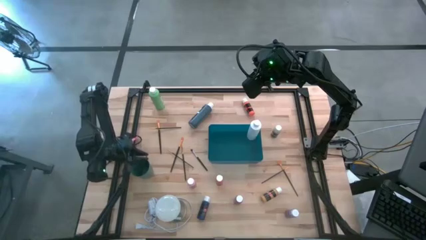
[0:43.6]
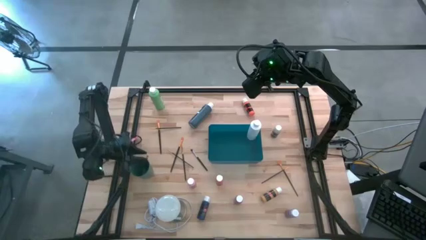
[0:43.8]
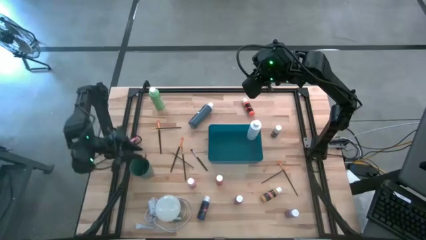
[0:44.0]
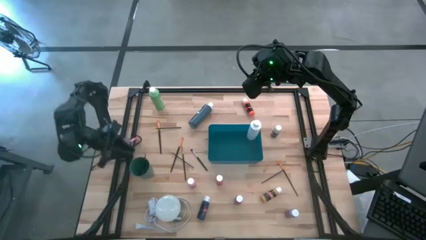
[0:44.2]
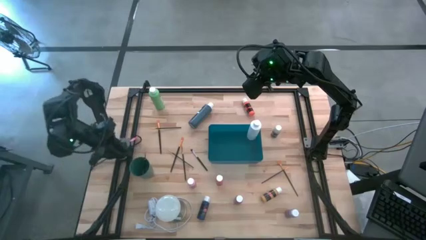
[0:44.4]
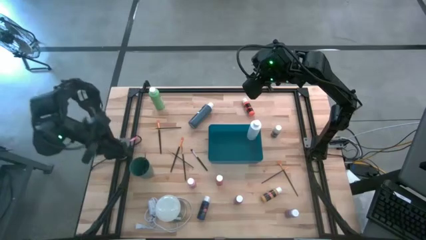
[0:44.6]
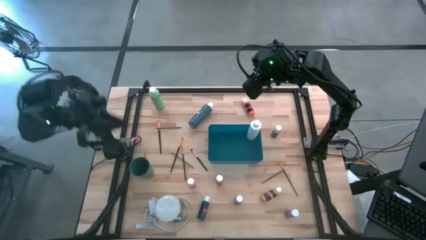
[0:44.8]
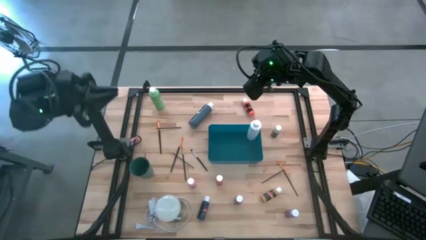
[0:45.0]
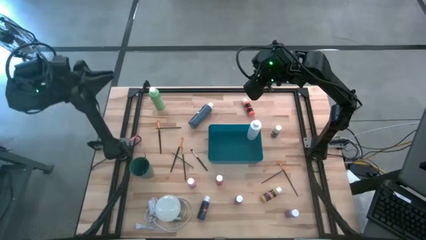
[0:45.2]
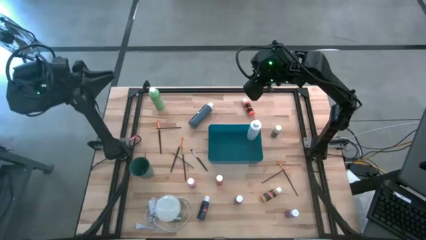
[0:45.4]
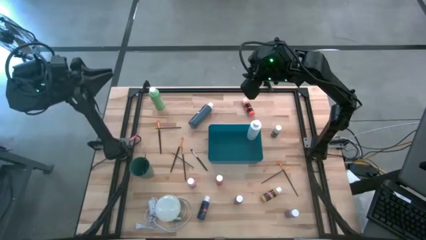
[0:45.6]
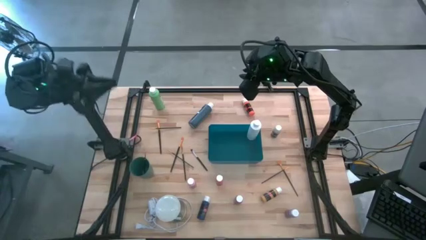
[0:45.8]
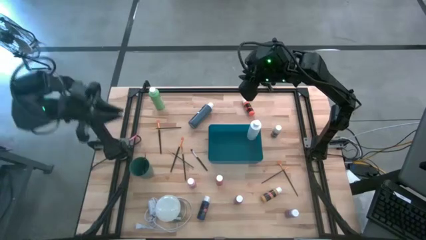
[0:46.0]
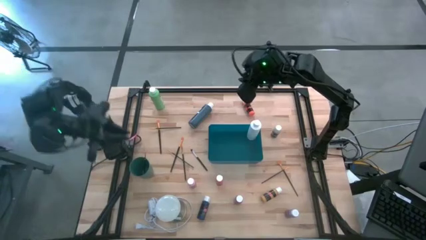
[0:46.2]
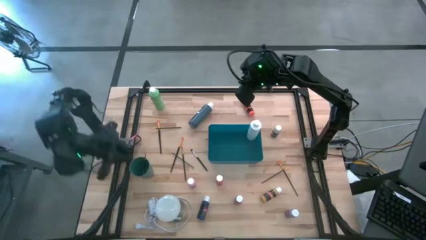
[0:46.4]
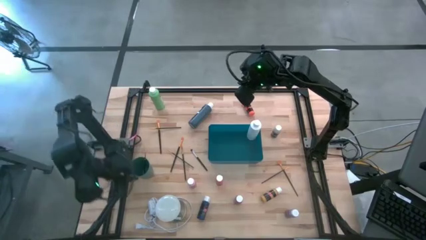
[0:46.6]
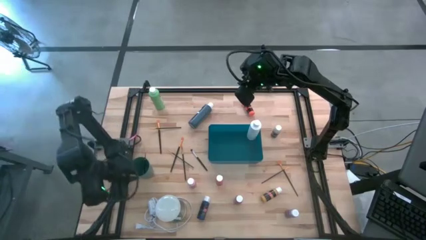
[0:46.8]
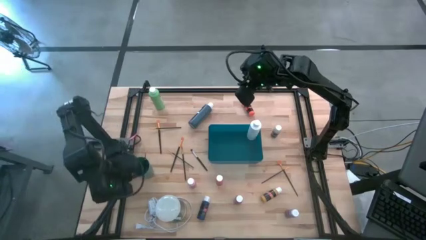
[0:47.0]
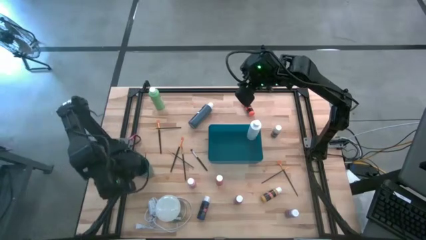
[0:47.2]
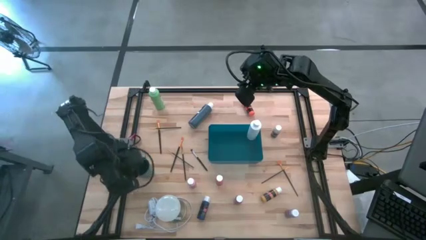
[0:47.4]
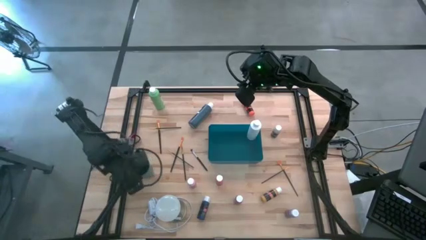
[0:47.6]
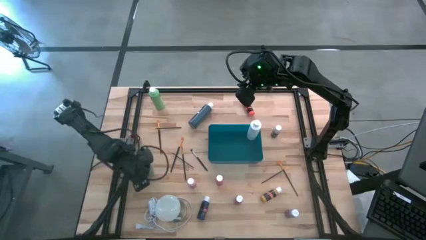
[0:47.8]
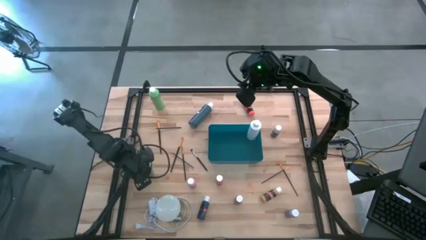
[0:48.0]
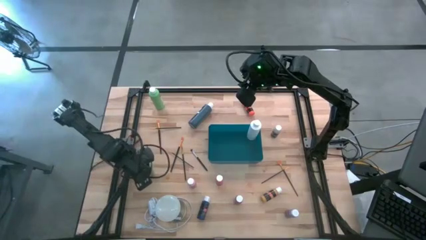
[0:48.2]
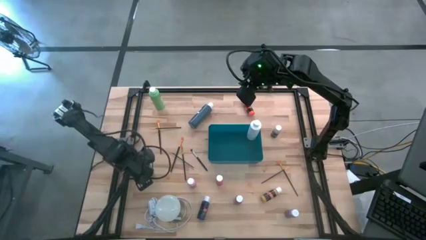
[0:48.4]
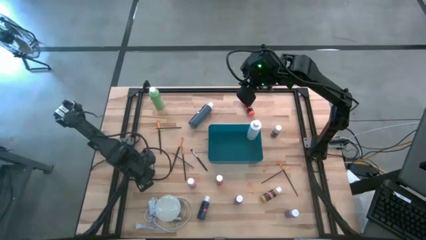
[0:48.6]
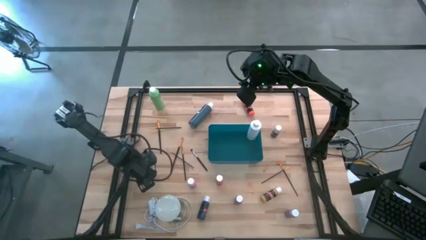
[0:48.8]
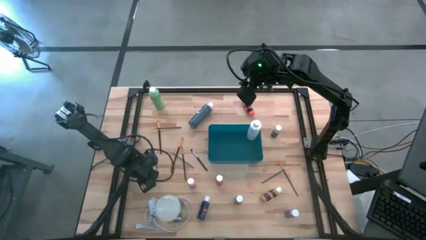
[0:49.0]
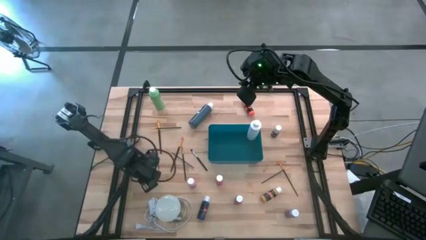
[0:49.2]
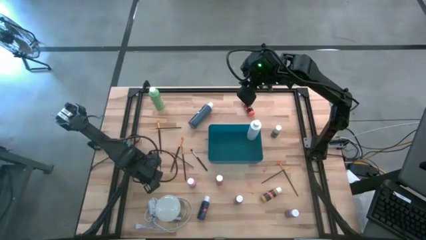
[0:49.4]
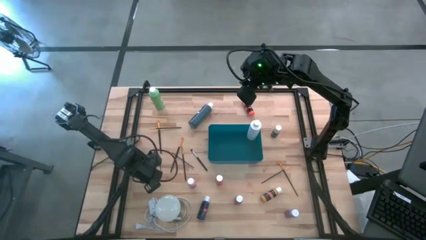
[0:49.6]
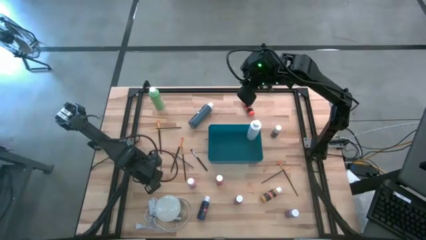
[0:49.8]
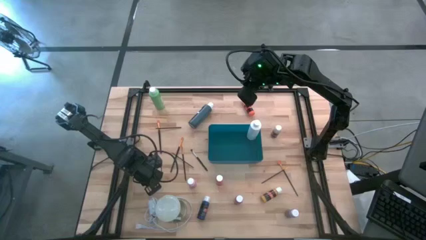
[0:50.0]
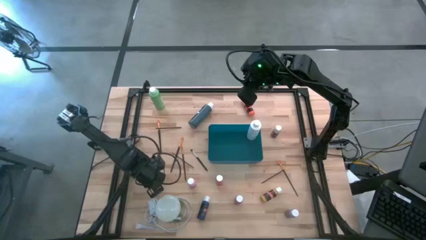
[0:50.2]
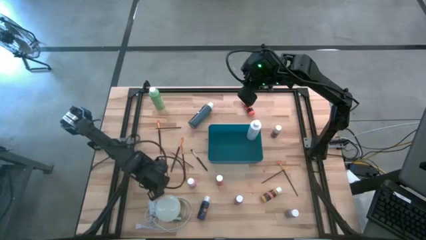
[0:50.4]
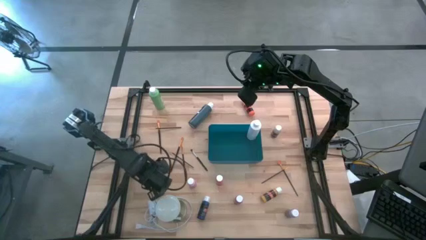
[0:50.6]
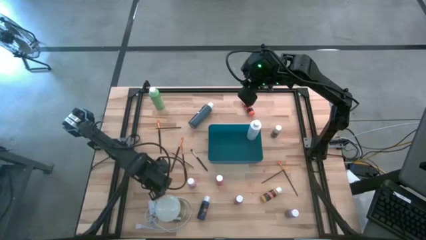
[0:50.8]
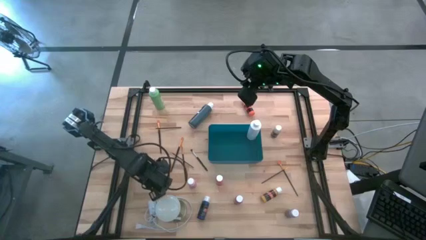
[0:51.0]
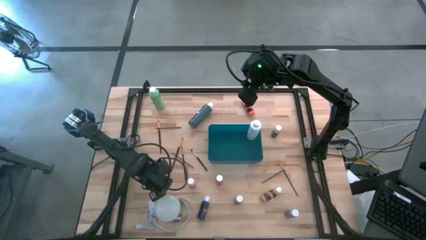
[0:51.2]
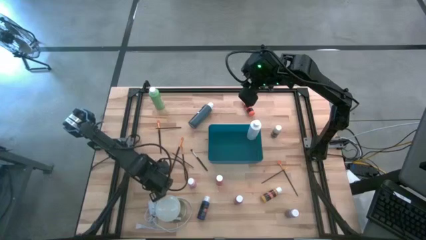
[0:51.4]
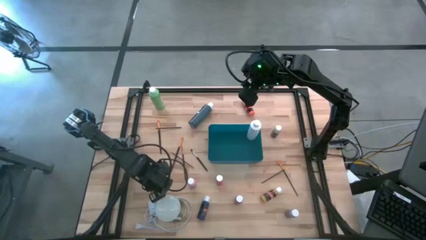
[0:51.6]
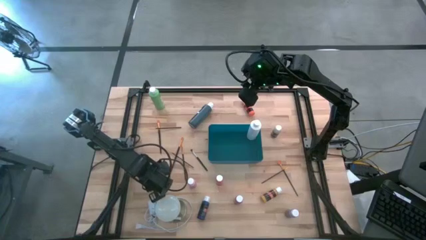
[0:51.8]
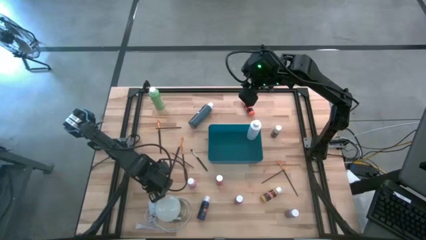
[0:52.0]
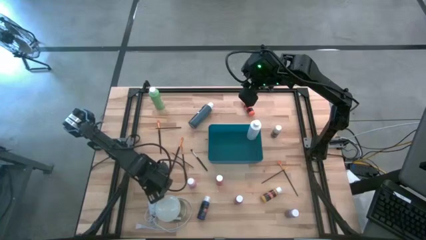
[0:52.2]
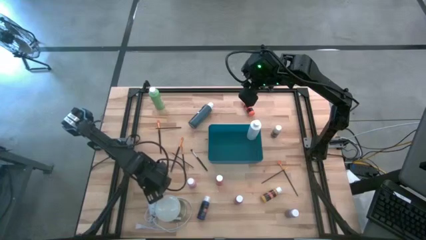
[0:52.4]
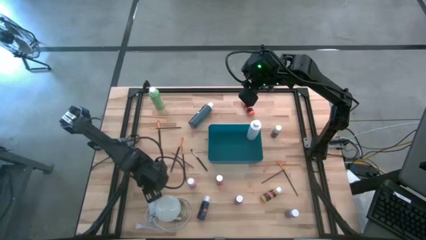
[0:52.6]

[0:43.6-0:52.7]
Task: Pick & Place Paint Supplies
Adjust the green cup on the table

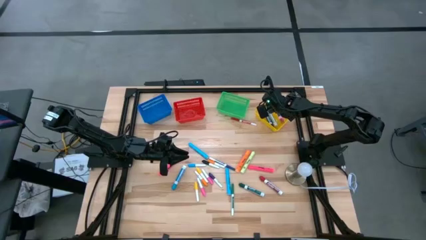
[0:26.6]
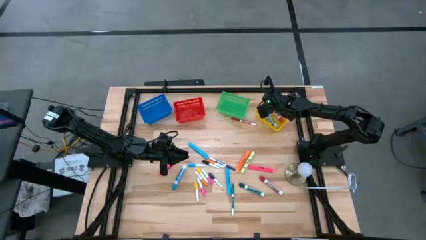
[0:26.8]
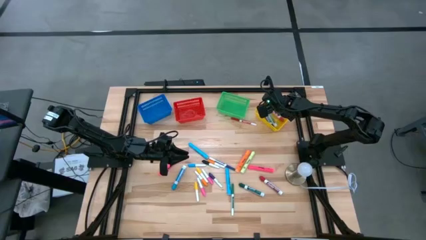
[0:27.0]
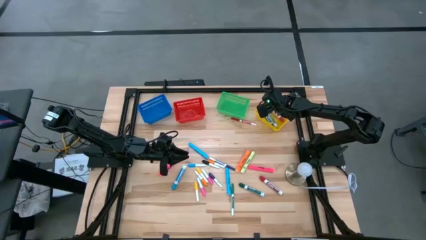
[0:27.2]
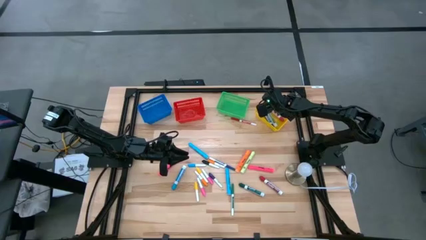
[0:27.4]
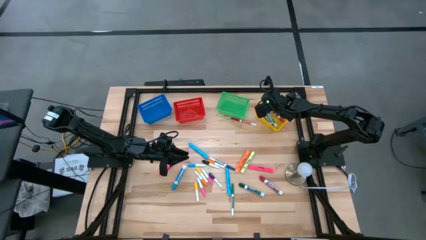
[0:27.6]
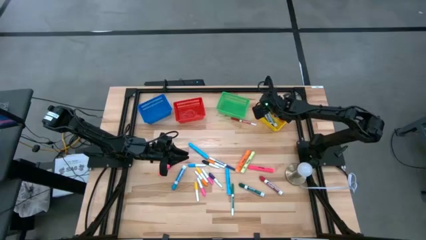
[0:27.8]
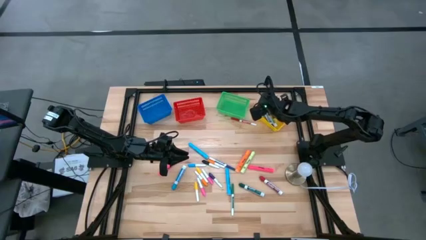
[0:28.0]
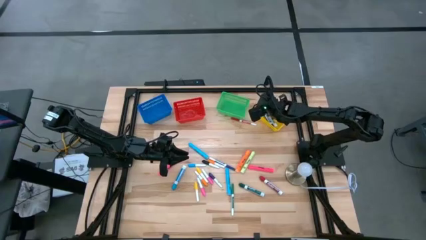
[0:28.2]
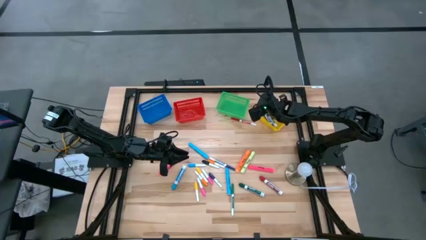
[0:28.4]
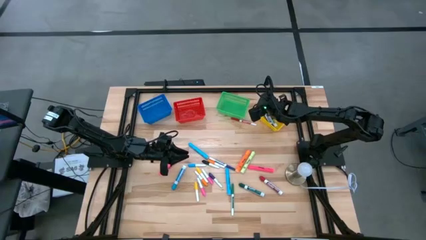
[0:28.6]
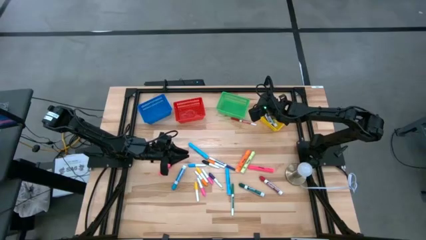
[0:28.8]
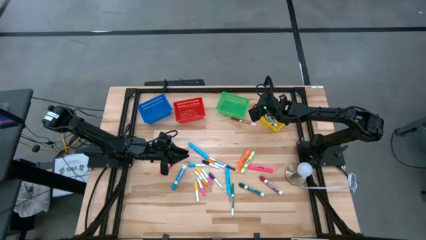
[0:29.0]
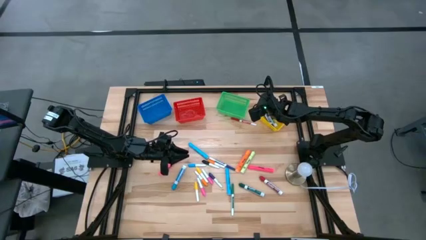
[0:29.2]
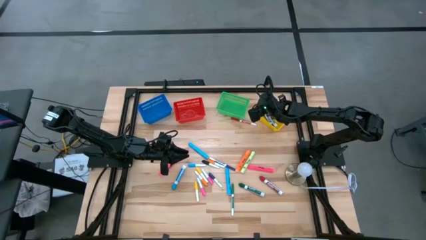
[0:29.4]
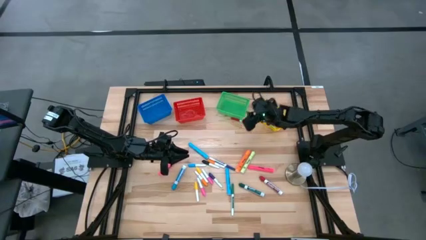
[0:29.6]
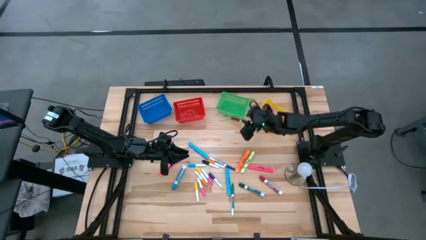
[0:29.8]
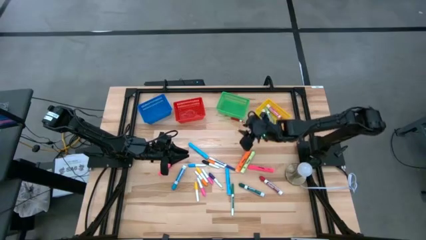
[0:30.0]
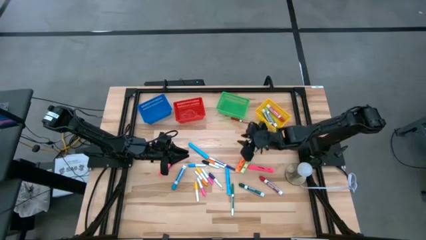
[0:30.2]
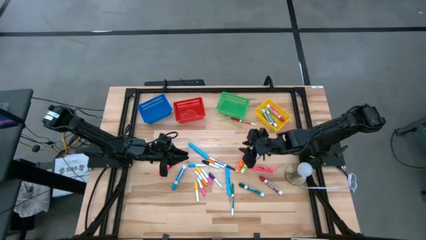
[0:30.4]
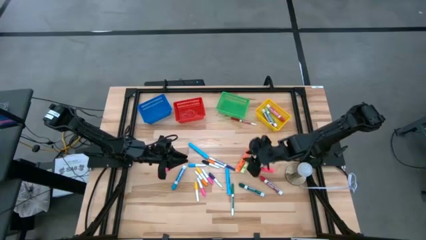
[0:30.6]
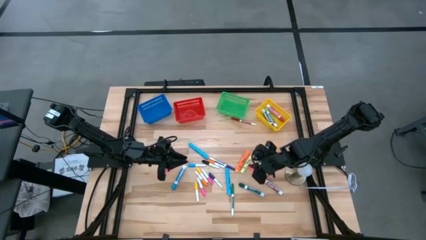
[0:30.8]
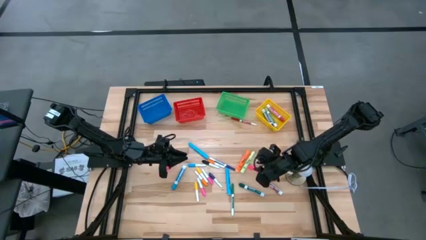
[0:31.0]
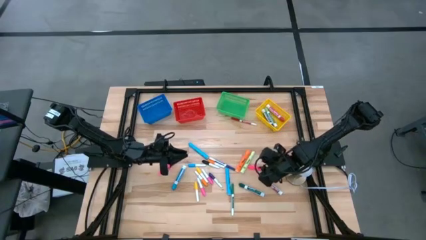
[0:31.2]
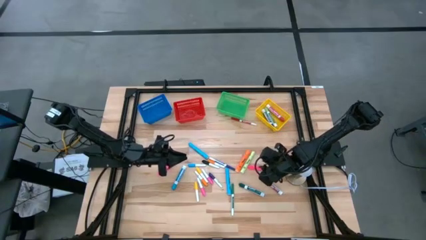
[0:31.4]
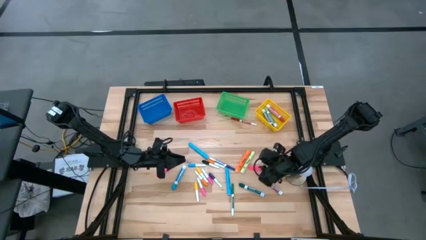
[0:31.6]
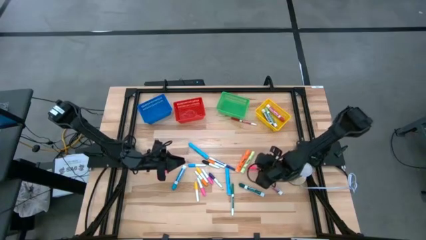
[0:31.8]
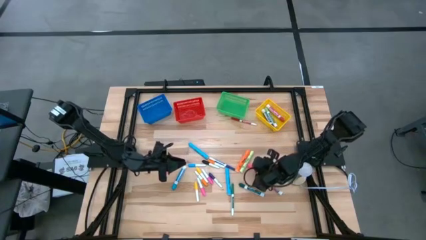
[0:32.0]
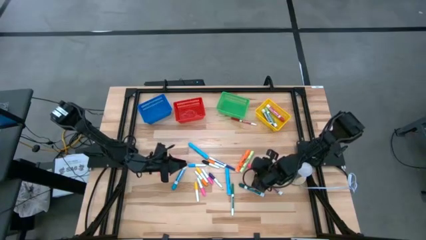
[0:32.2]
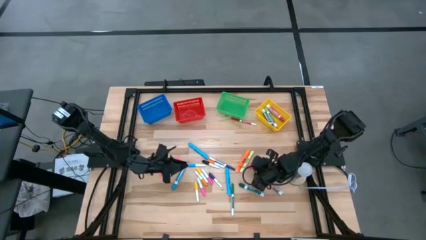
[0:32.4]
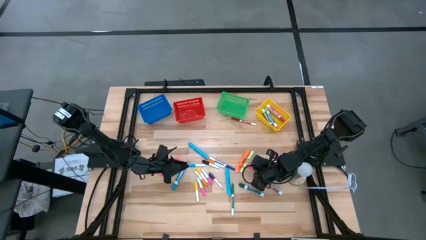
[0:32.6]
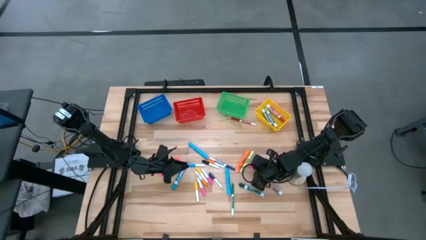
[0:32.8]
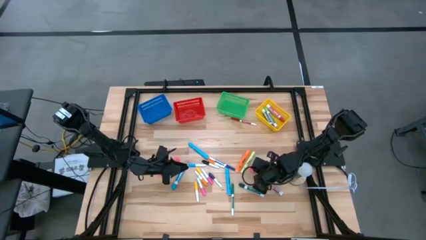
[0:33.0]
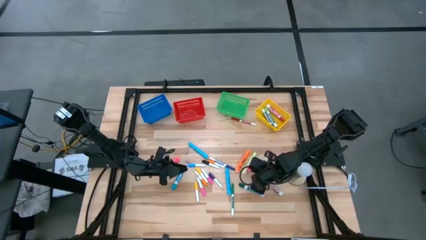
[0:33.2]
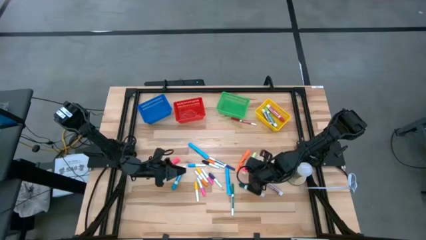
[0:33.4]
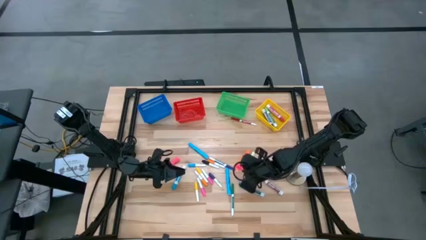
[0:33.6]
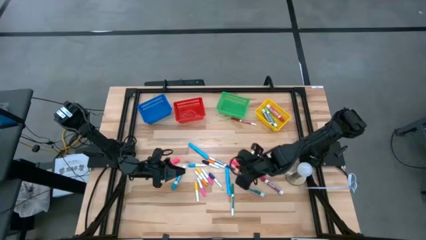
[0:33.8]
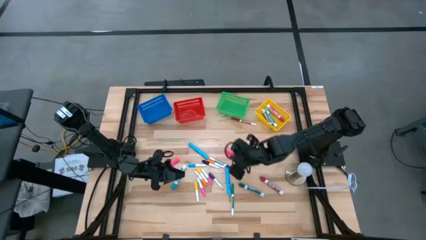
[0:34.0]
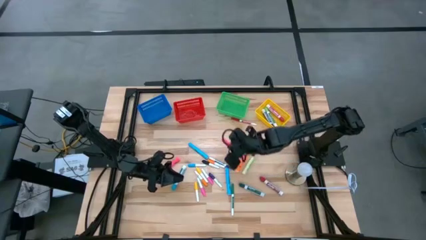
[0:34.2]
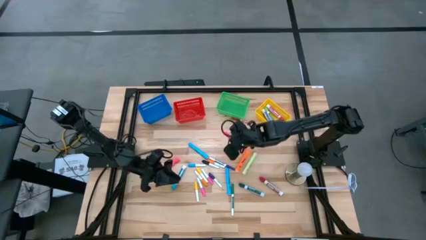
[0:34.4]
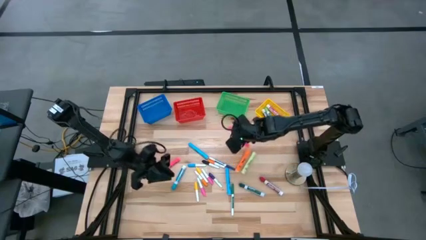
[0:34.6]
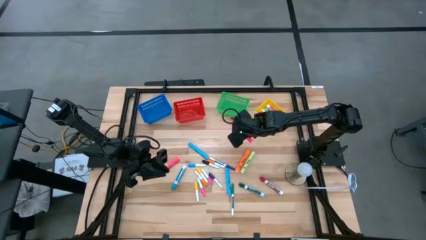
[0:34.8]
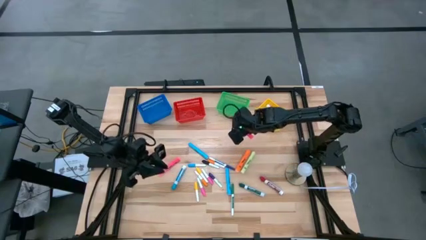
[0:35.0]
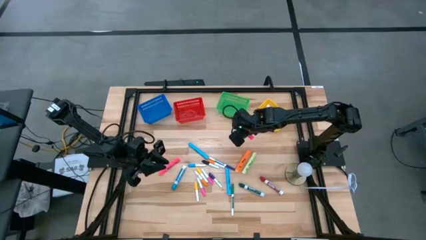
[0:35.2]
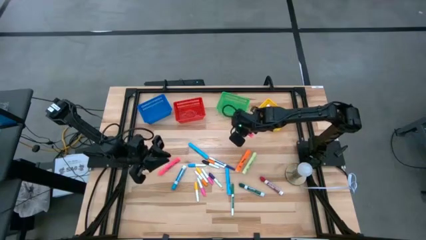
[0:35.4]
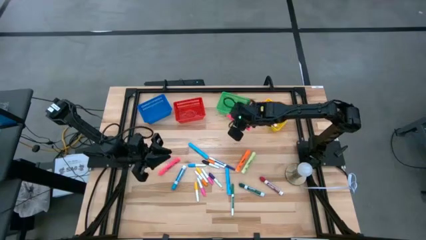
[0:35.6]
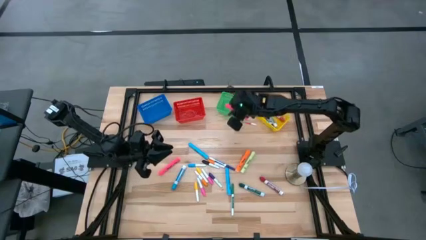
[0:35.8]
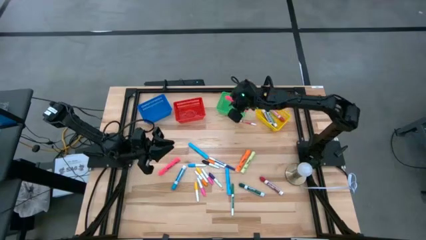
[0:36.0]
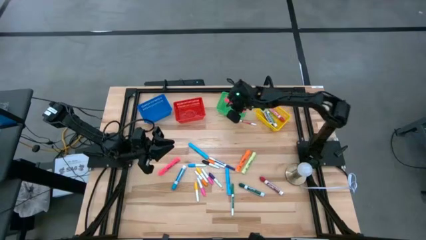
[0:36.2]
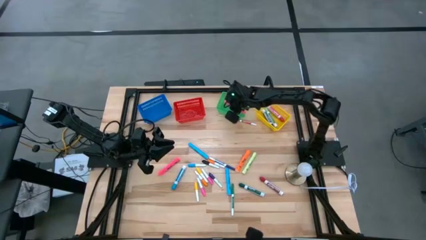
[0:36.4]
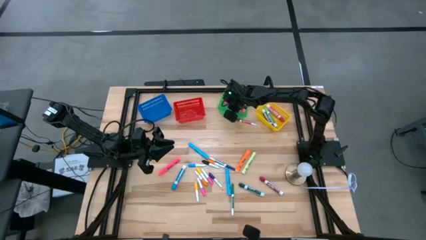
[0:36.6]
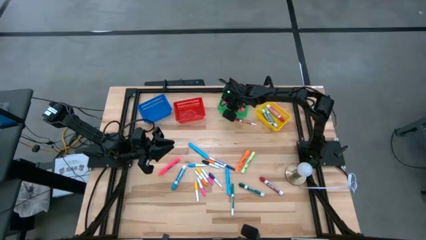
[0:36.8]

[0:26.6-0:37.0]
Task: Pick & Place Markers
Put the right large pink highlighter pen into the blue bin
